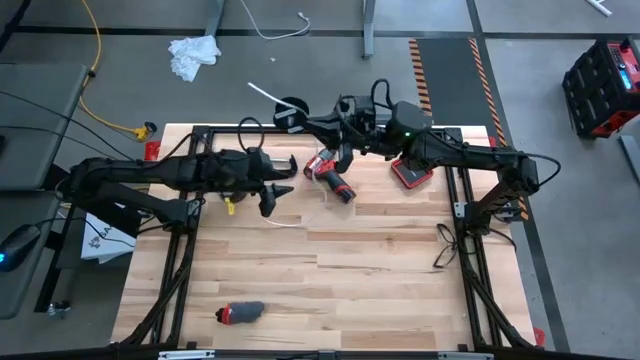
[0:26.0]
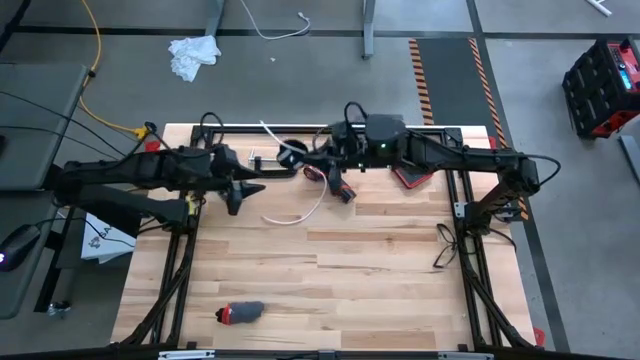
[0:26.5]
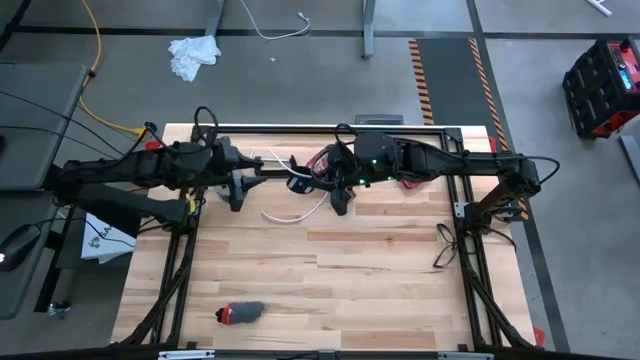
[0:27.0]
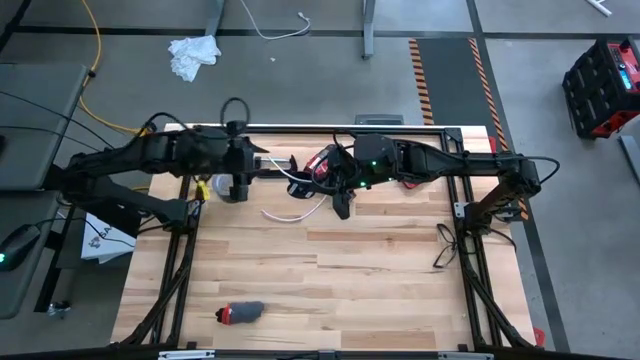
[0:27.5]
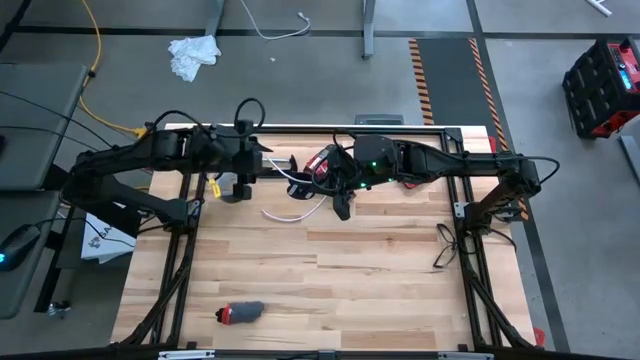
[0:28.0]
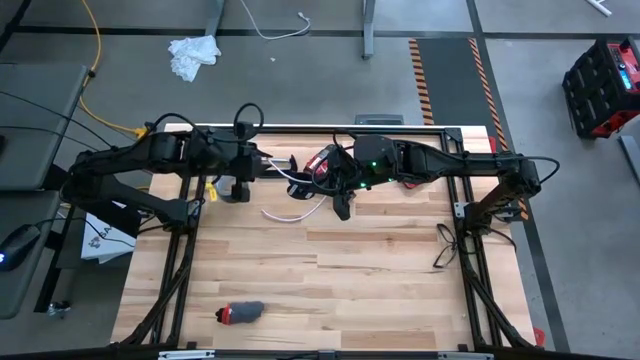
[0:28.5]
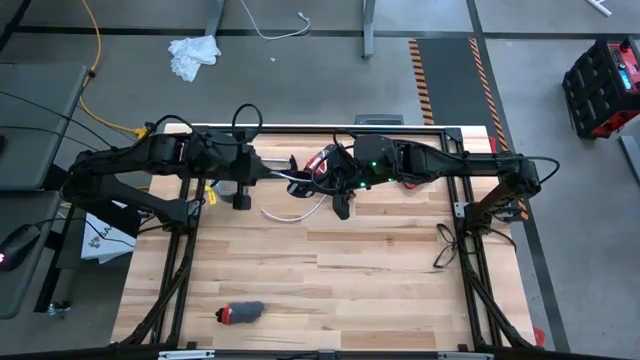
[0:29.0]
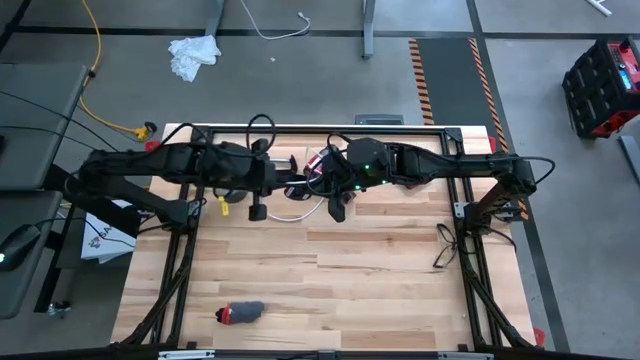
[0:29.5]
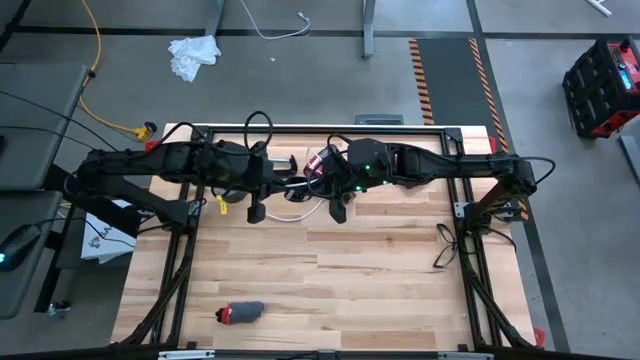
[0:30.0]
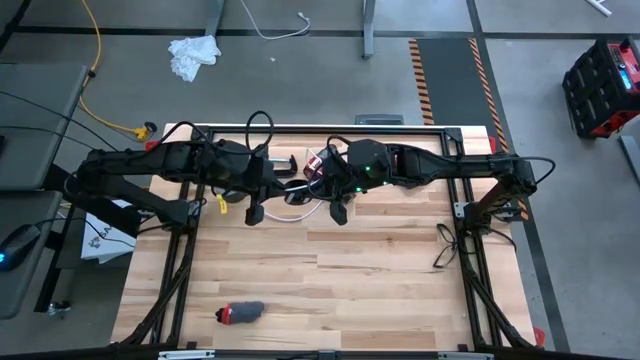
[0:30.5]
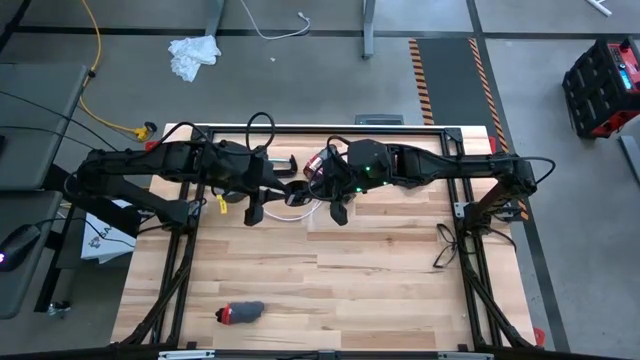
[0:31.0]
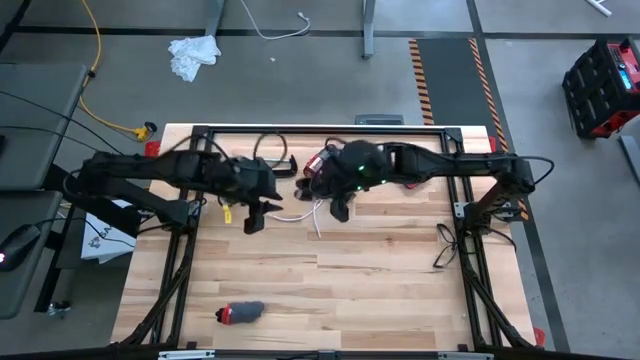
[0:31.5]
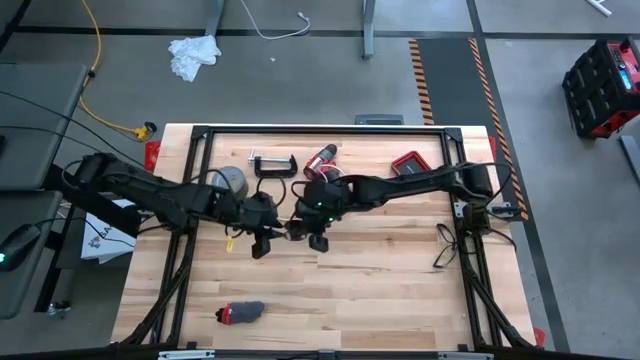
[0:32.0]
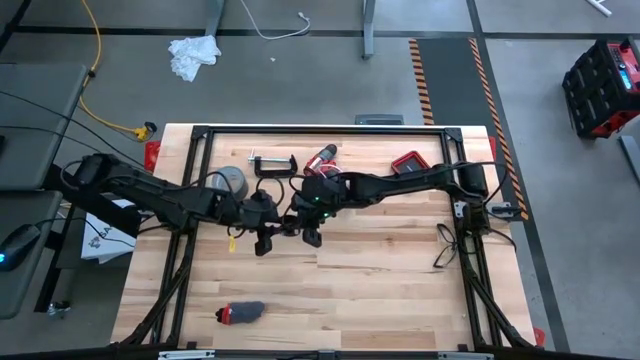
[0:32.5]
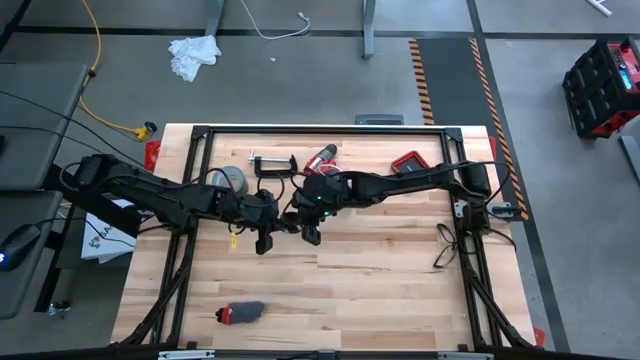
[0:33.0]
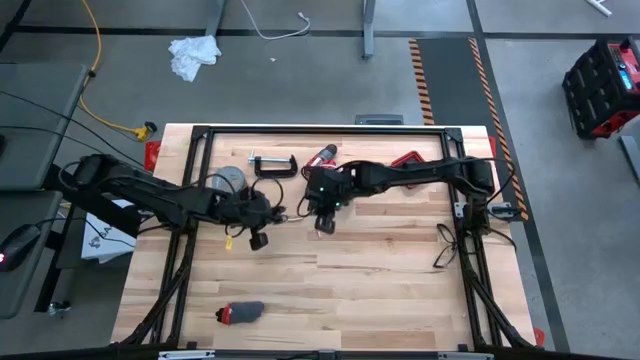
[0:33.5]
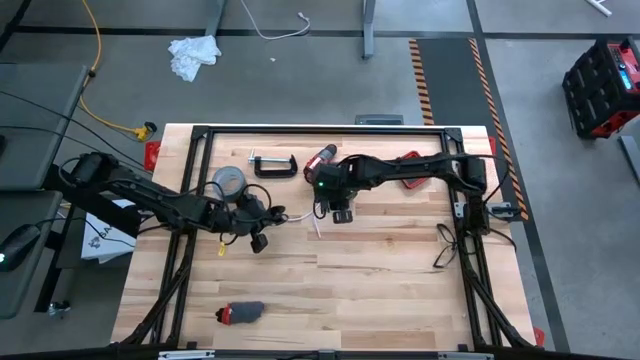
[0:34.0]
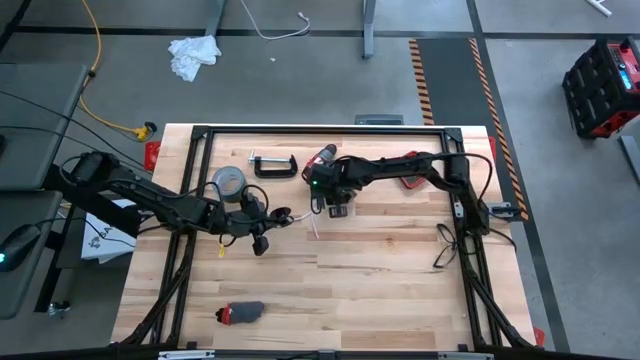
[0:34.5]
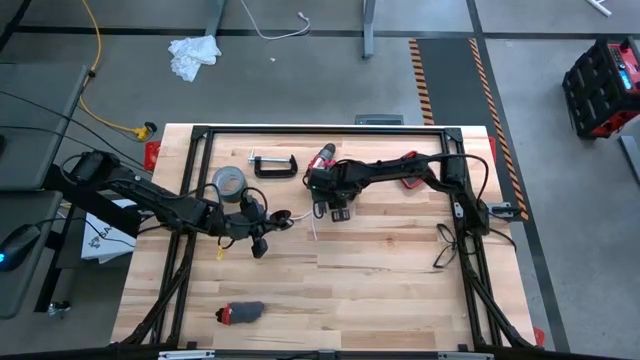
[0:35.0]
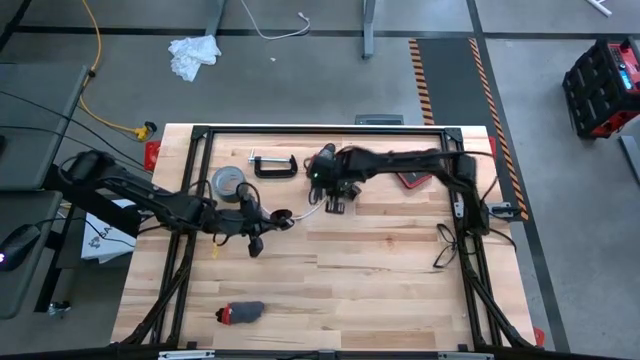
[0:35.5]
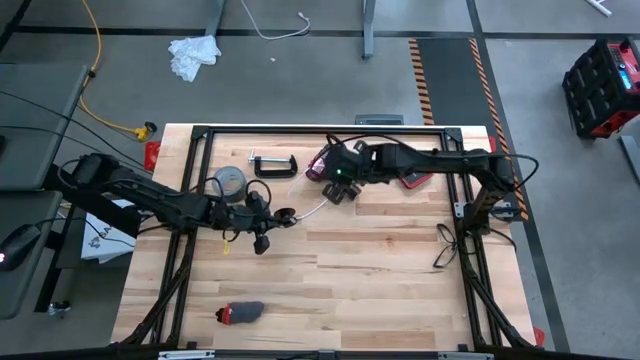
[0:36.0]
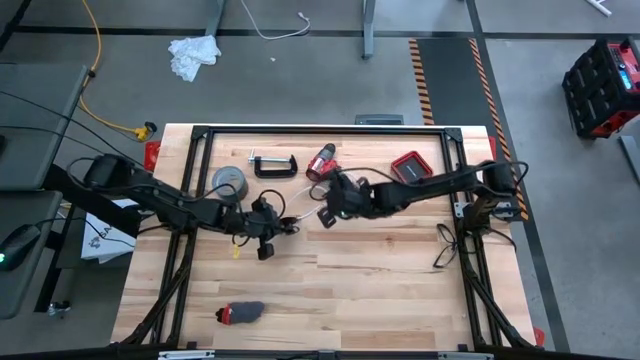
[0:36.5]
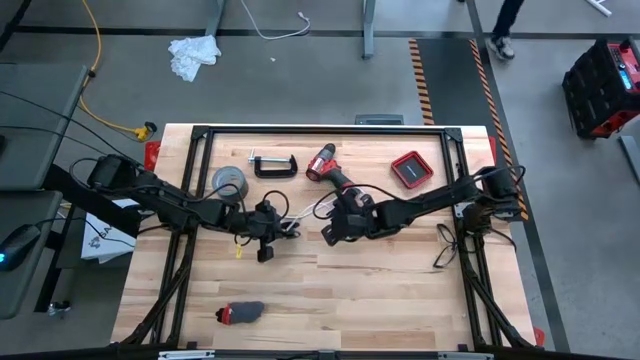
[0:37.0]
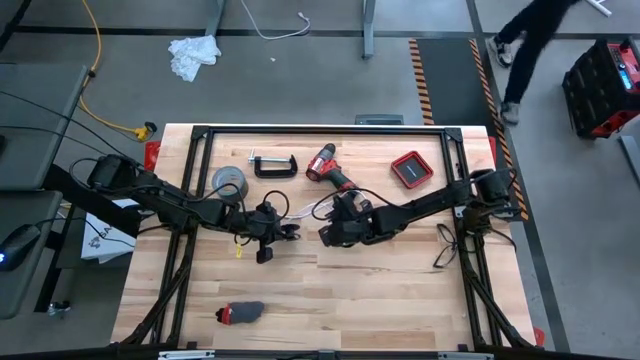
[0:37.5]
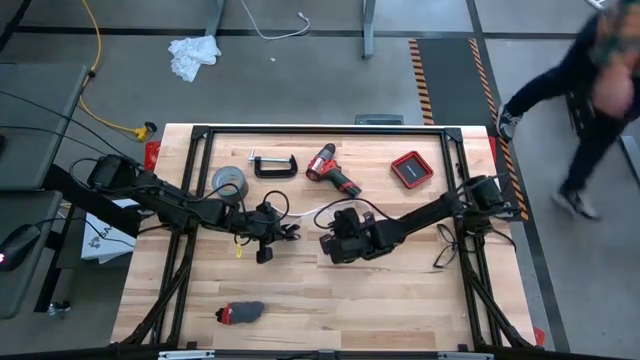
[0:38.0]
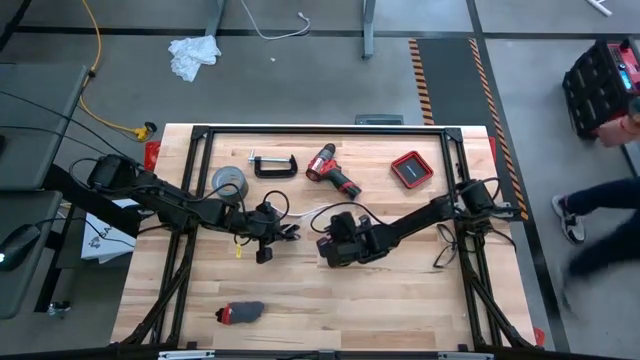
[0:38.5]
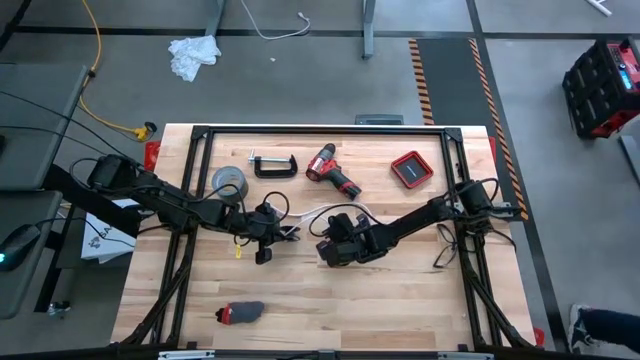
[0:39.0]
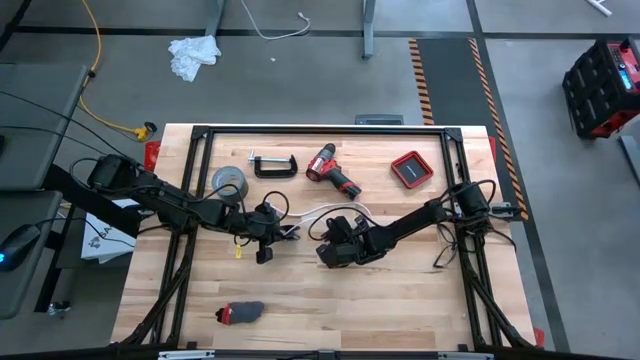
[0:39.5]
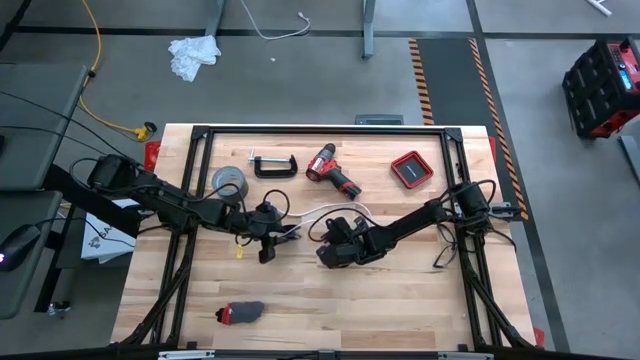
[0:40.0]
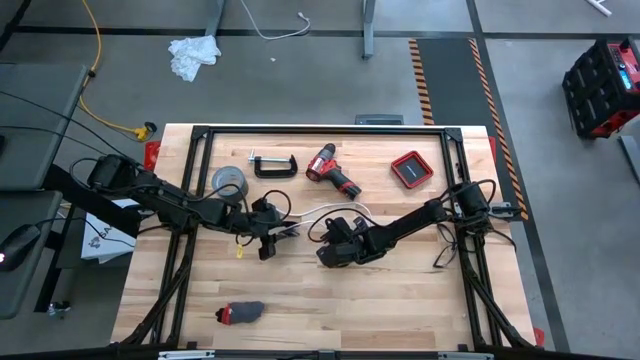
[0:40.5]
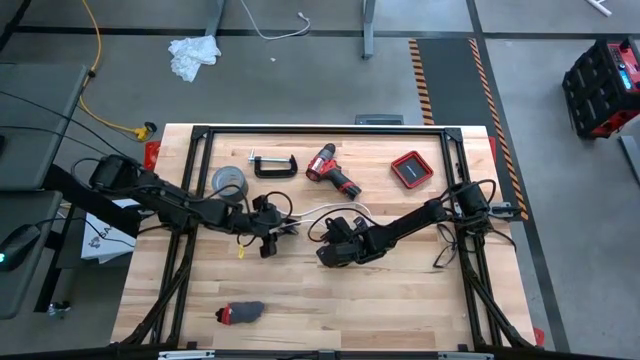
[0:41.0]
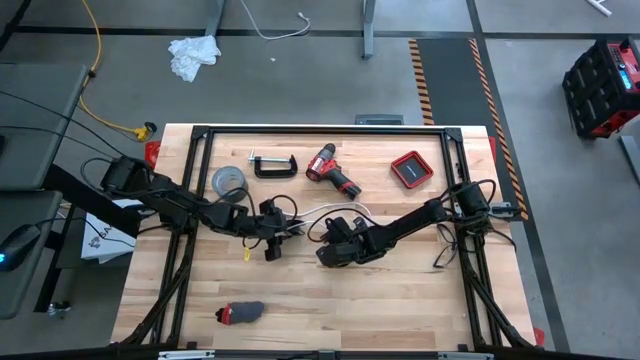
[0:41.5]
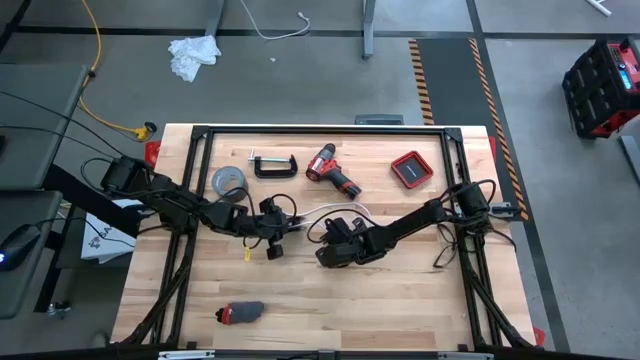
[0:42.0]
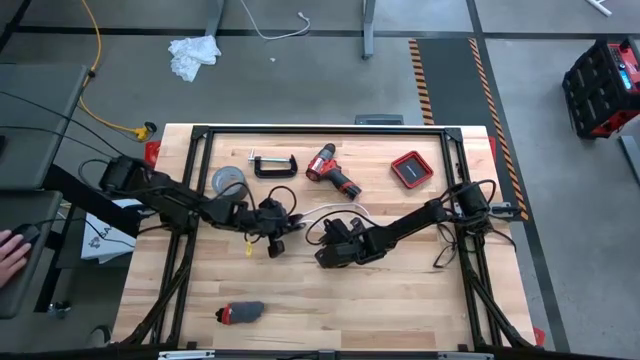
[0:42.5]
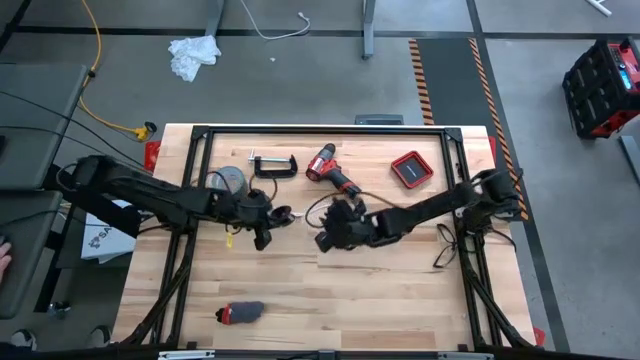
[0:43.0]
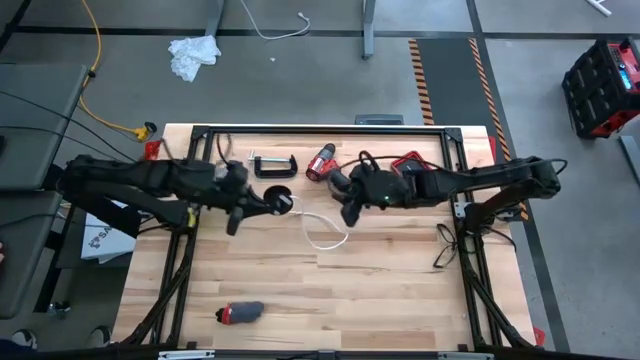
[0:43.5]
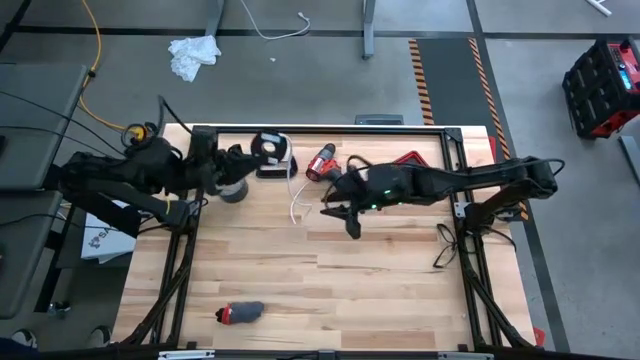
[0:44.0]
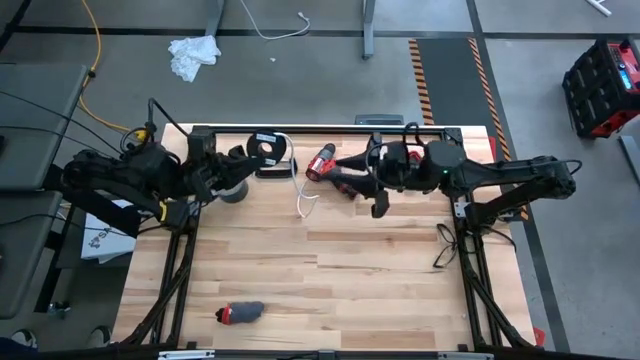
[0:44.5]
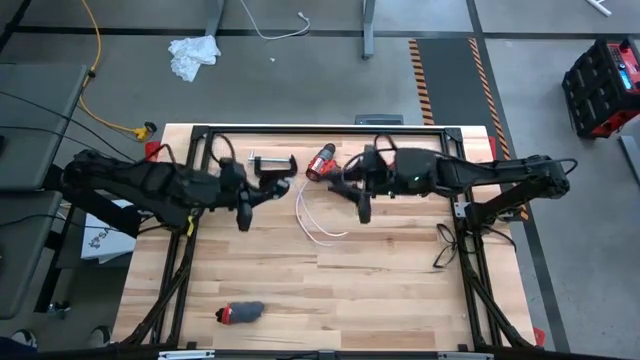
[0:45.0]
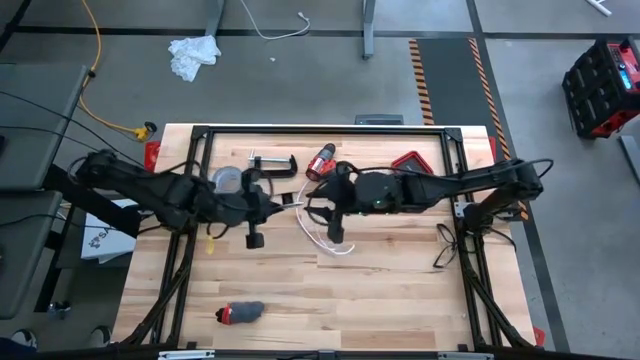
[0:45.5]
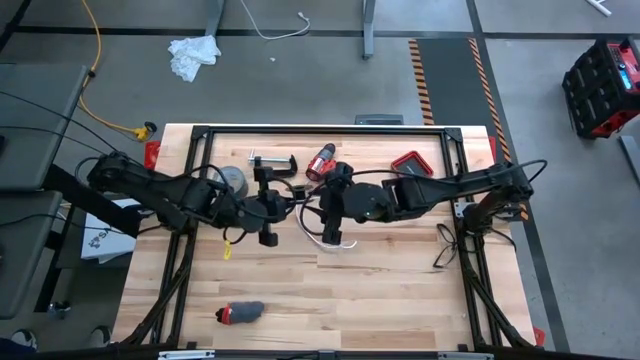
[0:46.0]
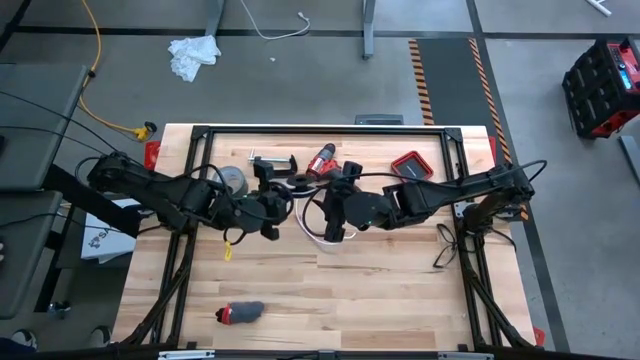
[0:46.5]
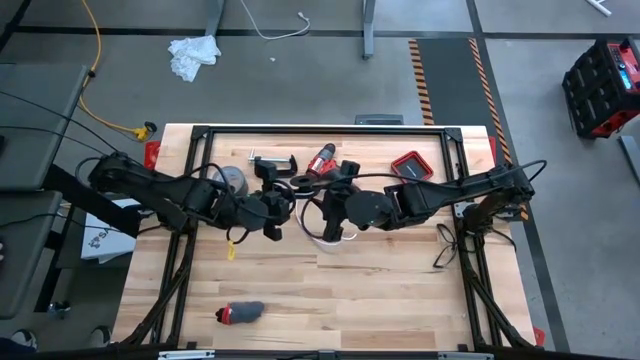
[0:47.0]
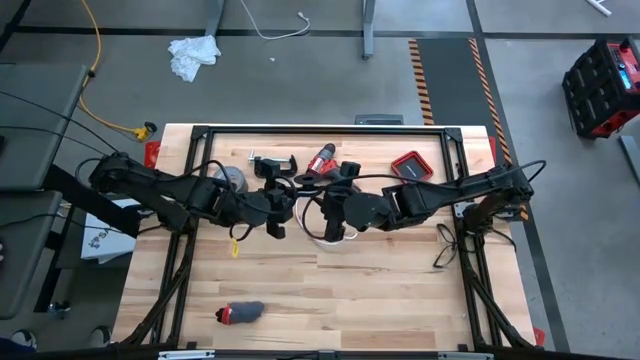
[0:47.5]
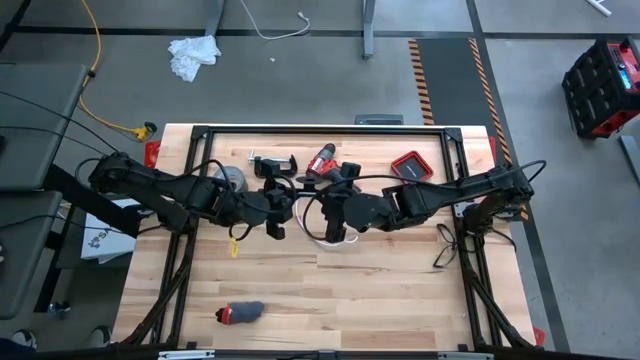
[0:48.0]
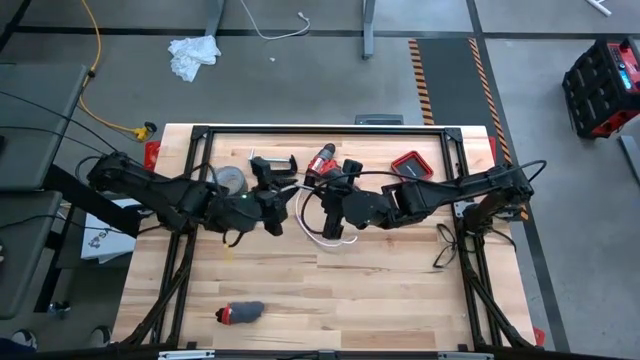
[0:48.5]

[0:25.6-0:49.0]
Task: Coil cords
Coil the white cable wire into the black spool
